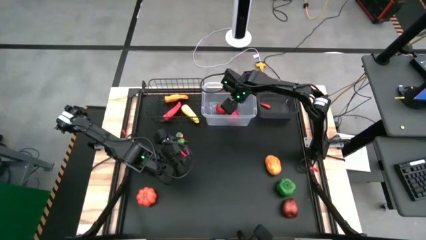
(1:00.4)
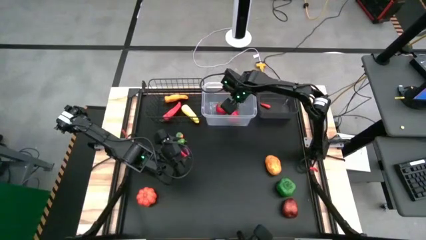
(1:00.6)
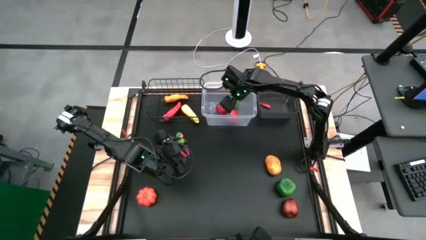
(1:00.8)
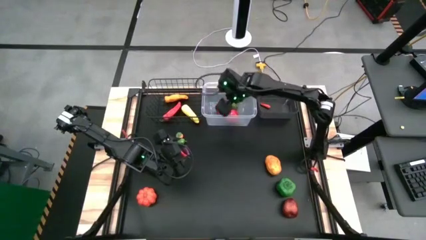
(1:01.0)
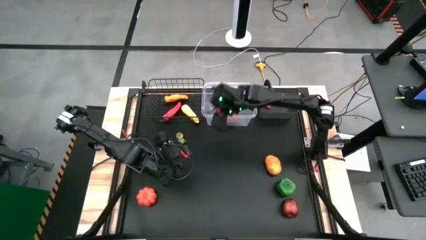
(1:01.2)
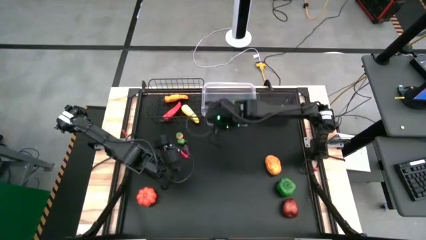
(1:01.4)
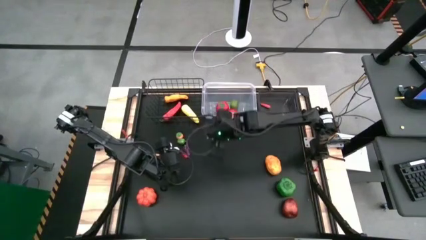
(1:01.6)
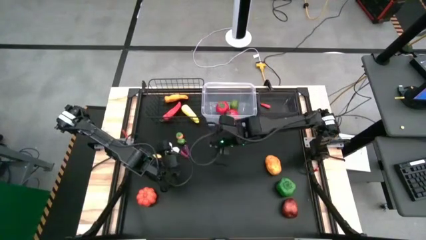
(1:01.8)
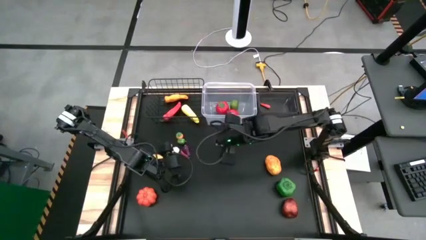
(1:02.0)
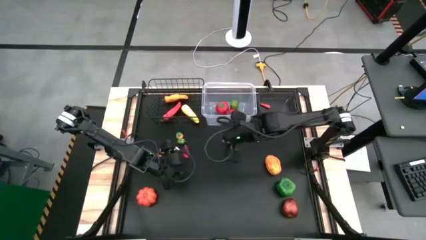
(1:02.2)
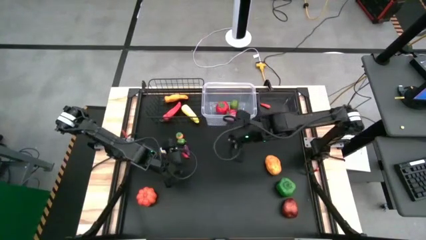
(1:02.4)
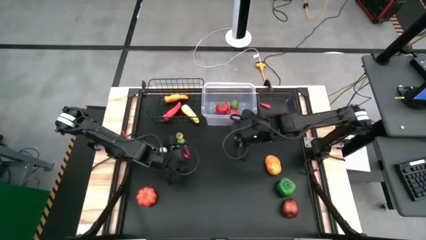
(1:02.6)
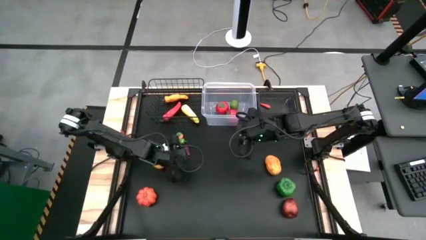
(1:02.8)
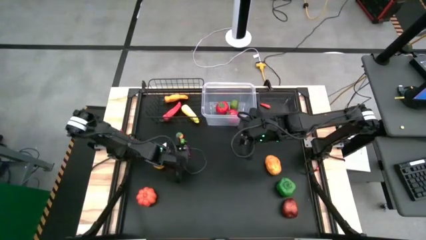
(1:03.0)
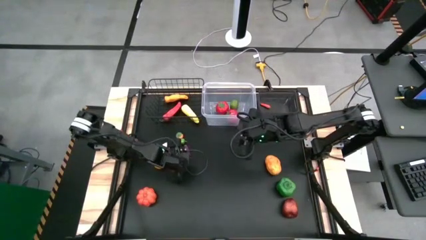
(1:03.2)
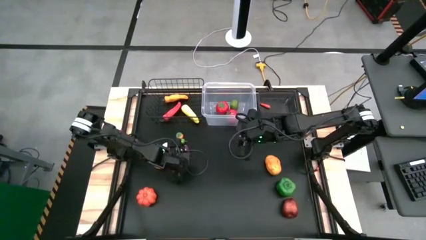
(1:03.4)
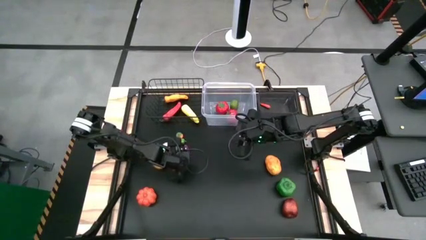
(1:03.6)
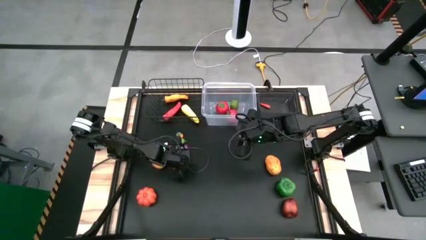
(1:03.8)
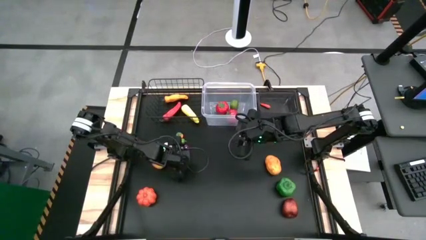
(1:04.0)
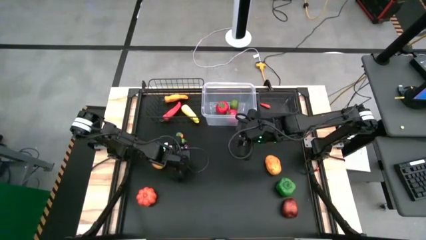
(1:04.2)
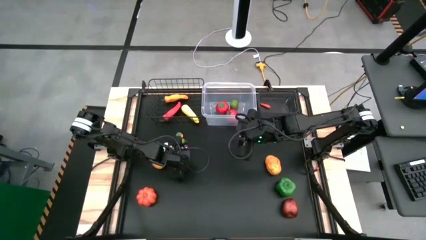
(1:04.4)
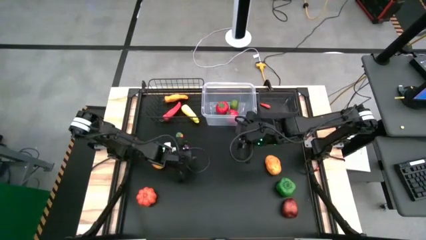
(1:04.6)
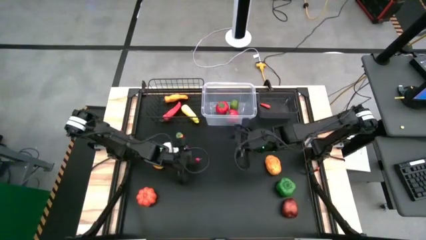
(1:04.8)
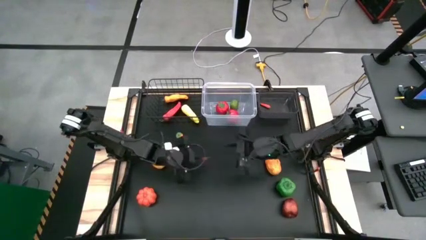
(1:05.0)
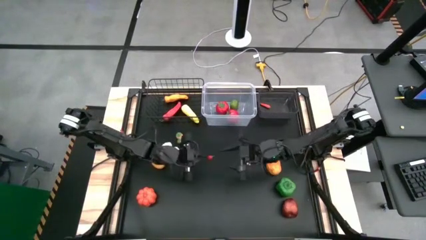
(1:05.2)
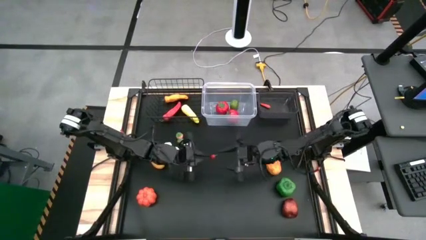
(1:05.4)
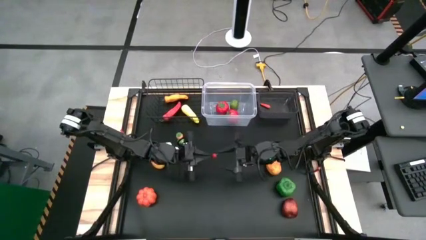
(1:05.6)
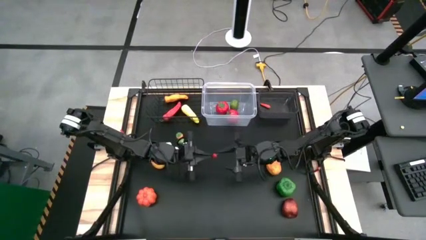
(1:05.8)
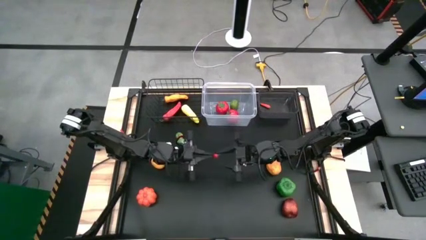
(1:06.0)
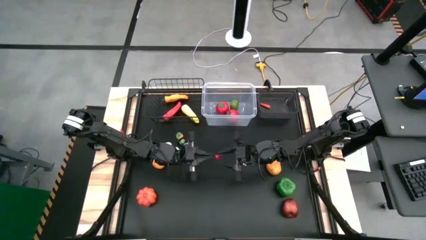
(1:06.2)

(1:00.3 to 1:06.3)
Task: Sort produce into baskets
Put the small red chili pepper into the black bin

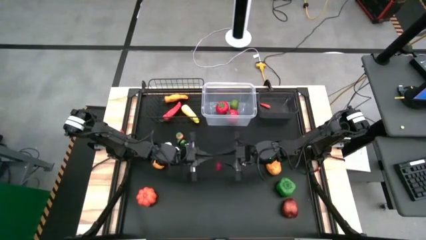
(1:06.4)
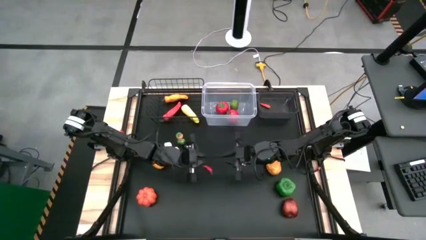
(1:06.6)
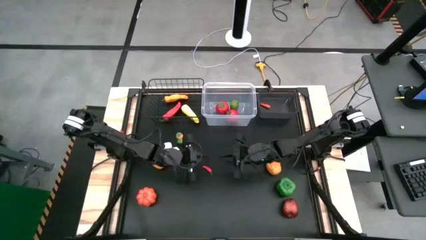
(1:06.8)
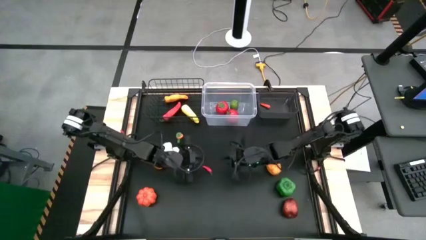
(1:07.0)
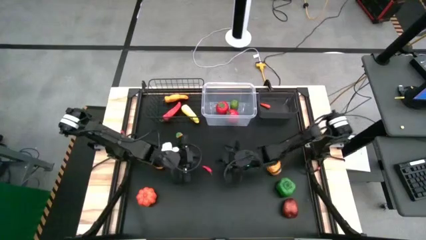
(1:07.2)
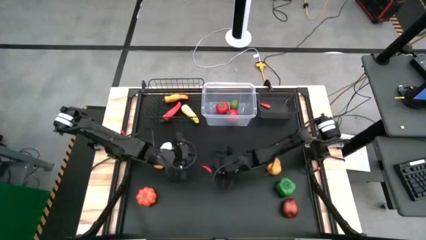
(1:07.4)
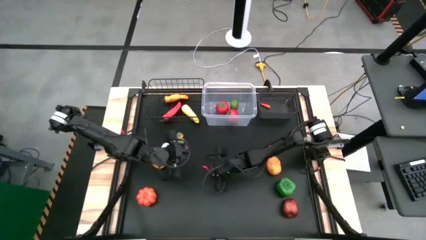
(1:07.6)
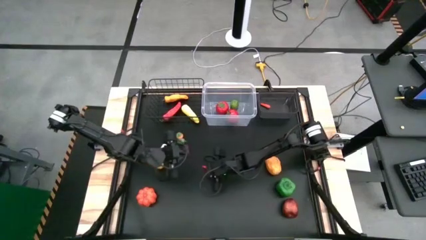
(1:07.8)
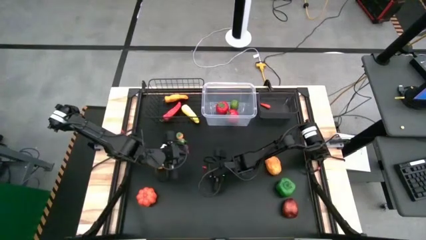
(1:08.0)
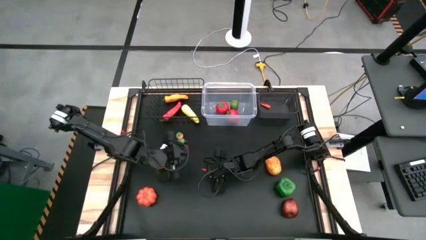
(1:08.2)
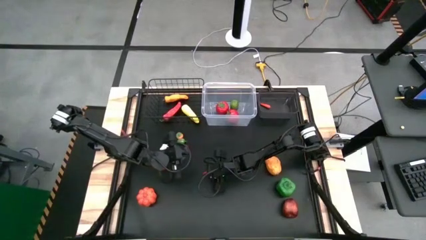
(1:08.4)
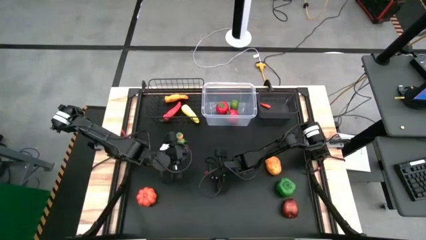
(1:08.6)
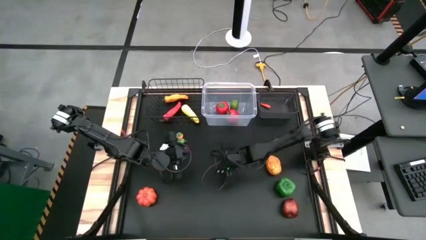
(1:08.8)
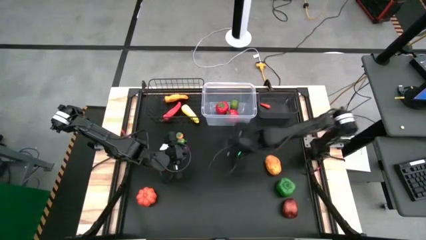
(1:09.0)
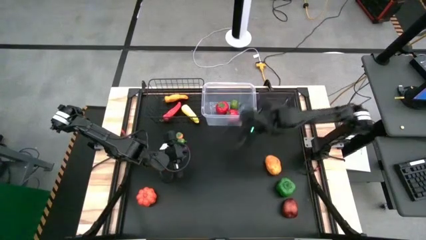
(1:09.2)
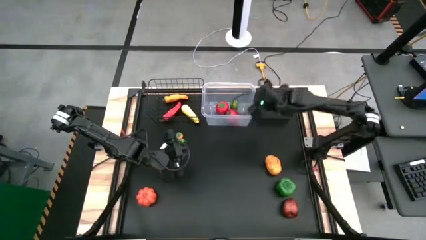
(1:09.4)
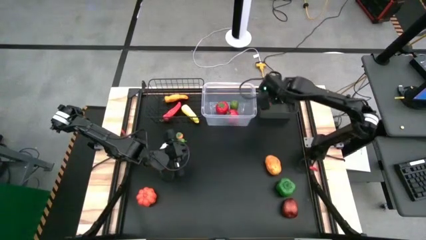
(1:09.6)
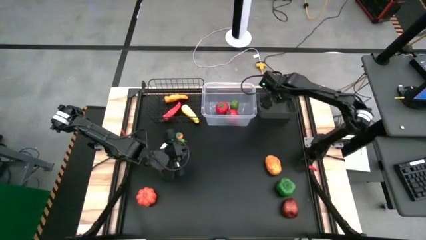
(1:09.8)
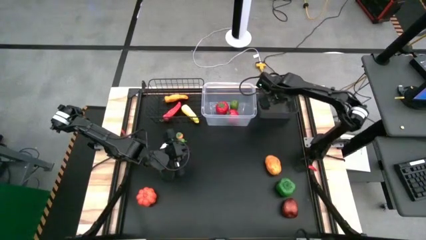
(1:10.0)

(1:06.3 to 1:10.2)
Put the small red chili pepper into the black bin

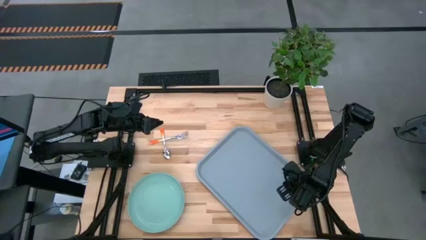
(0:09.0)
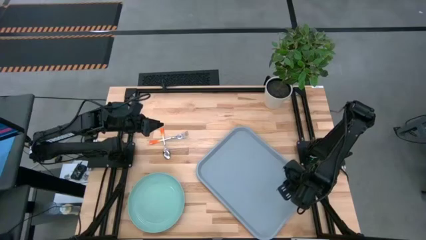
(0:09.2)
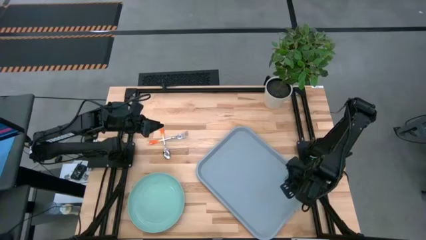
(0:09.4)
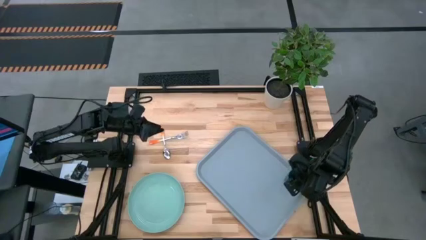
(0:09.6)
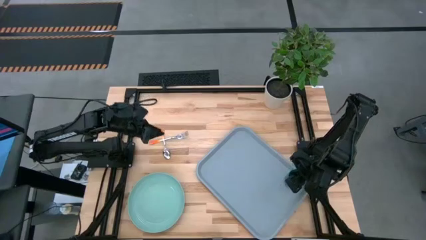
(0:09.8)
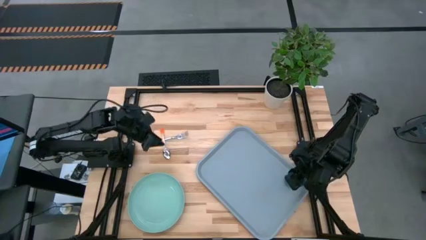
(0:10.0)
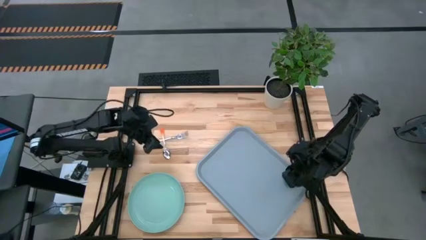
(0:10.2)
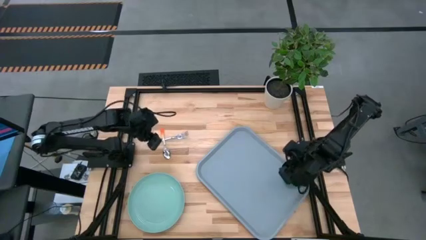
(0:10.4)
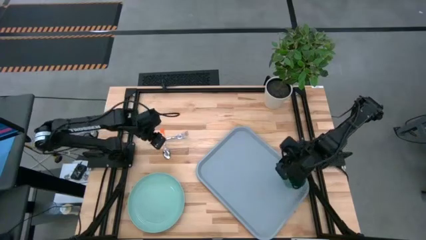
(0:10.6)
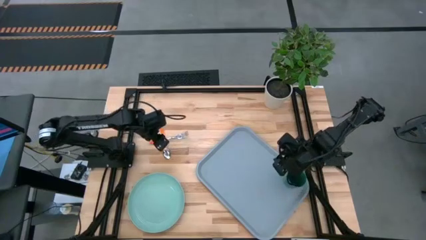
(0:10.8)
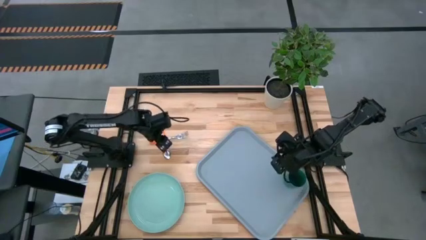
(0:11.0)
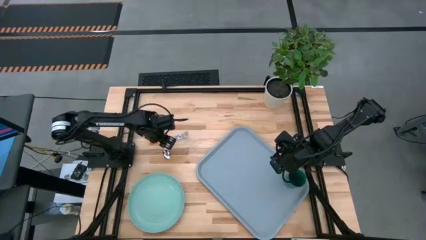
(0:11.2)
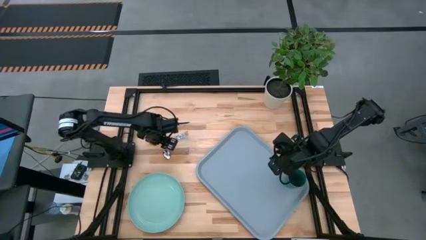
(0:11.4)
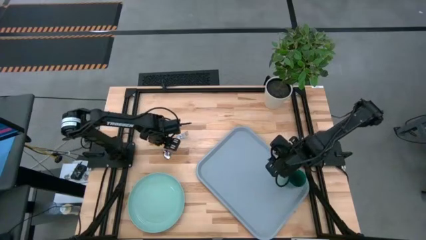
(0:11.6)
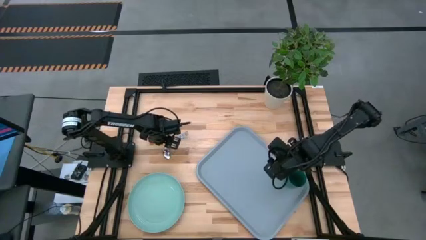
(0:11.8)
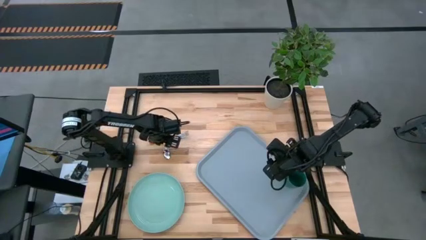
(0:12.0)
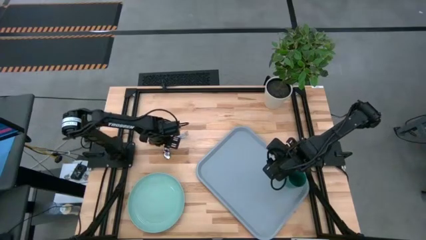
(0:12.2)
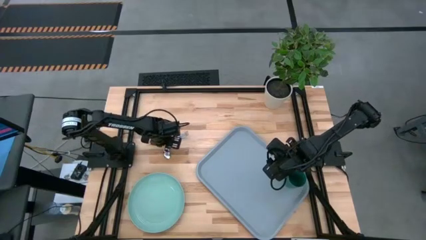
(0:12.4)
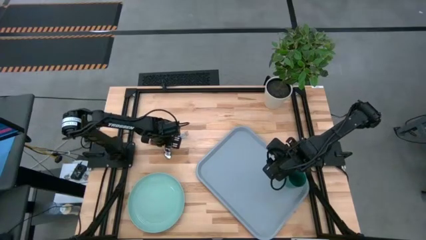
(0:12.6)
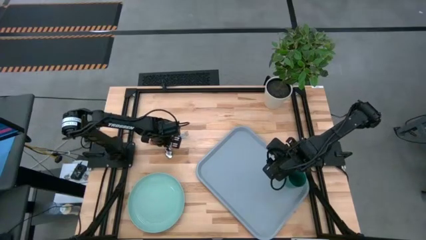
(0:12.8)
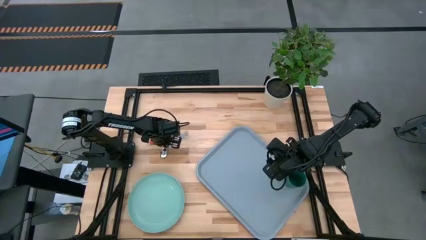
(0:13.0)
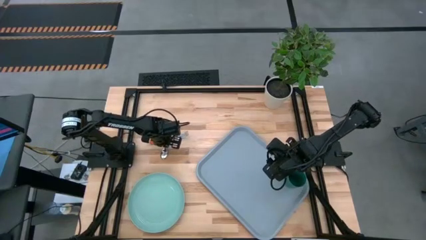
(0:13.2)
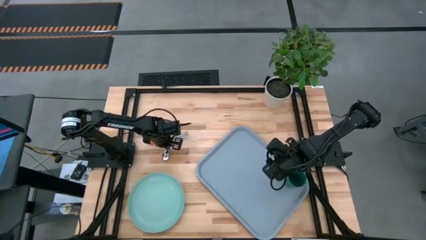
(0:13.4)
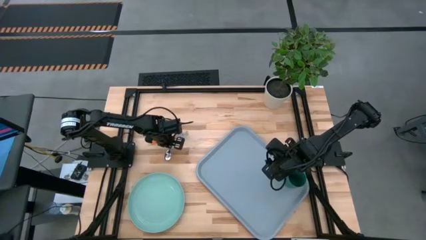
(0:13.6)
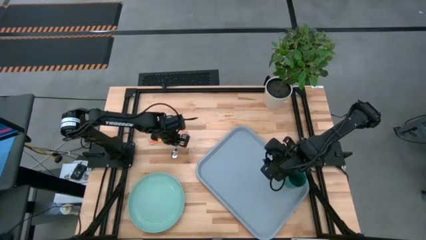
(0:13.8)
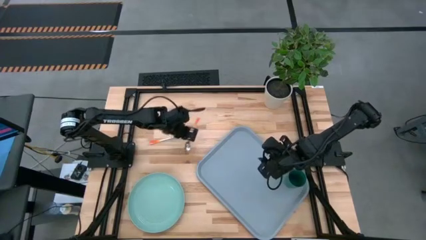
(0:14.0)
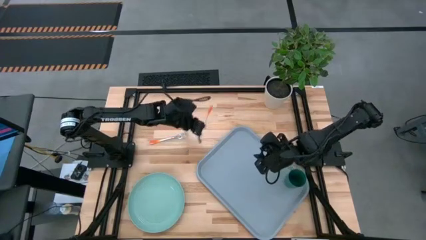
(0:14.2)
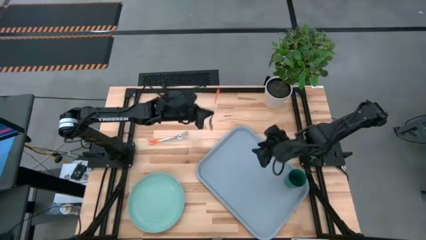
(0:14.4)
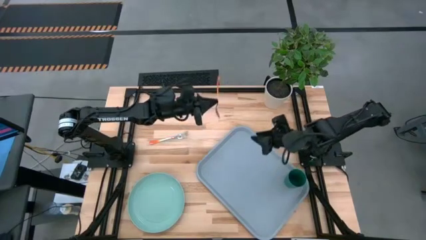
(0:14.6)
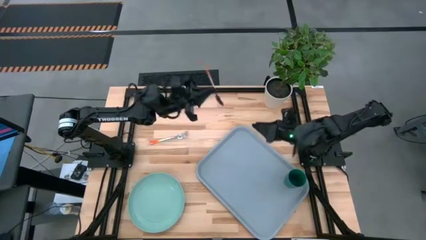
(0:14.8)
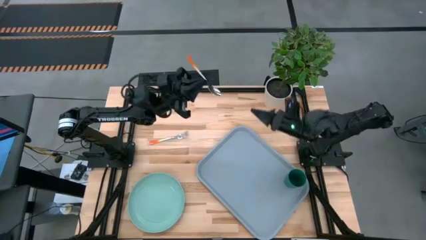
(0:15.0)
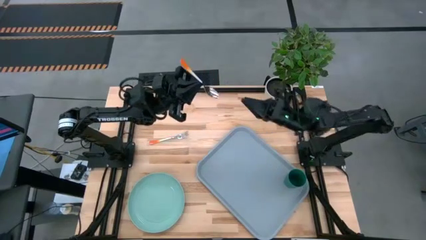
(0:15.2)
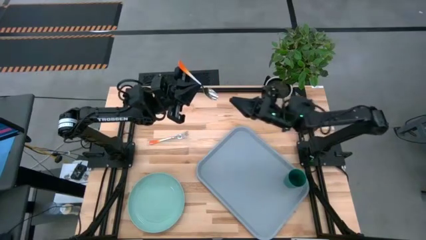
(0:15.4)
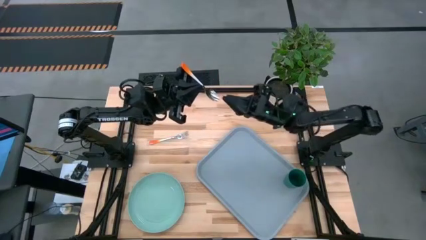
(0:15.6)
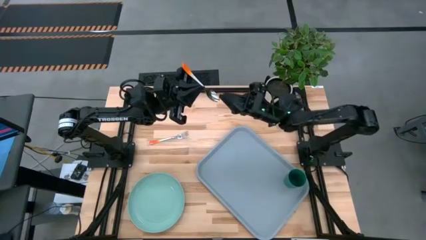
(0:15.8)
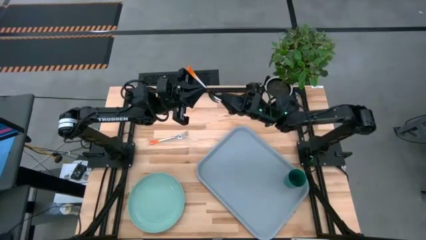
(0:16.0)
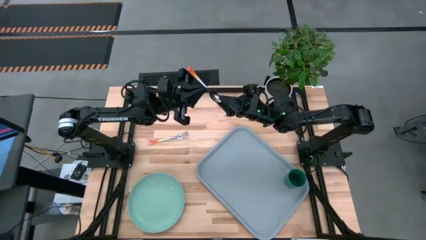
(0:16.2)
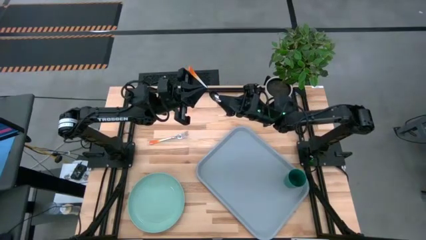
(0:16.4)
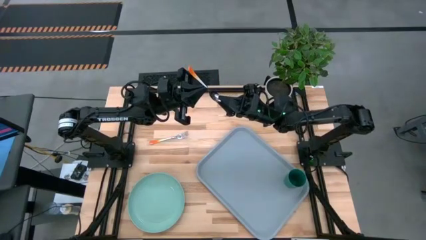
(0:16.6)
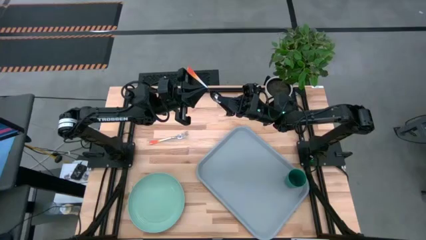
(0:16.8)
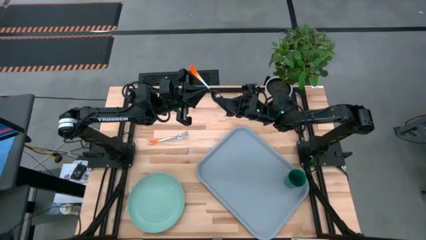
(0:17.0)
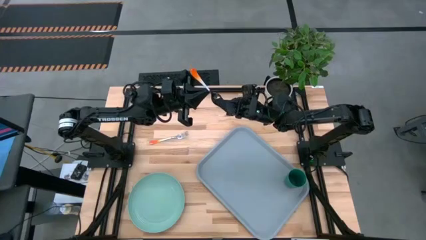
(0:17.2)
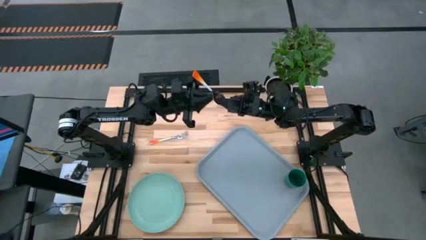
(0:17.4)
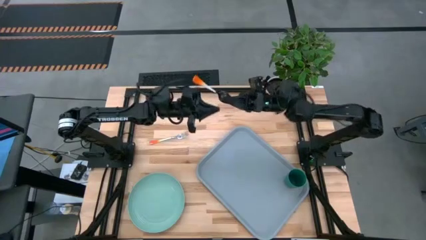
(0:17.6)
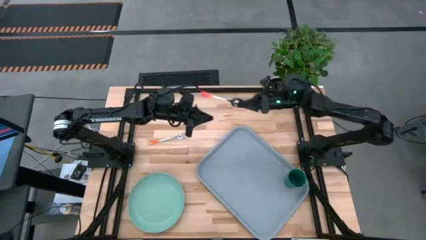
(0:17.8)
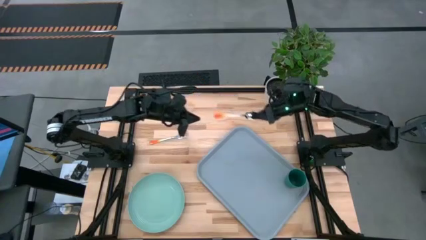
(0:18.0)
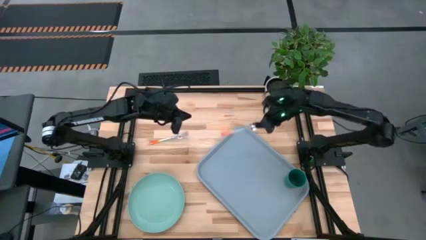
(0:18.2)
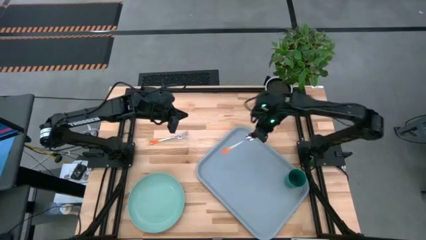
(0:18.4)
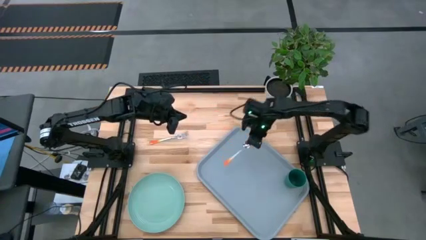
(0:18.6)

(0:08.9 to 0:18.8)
Task: Pick and place plate/cup/fork/spoon on tray
Put the orange spoon on the blue tray
